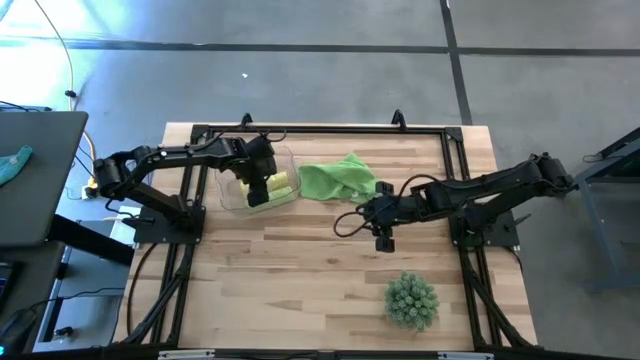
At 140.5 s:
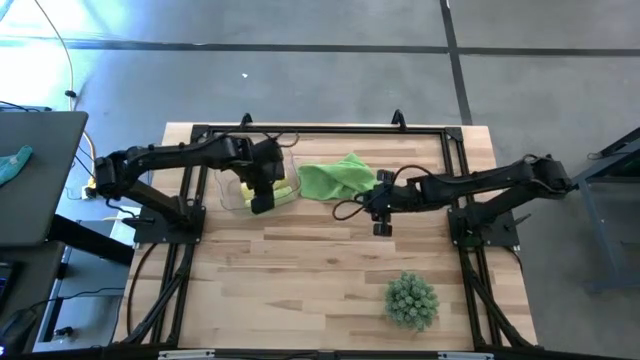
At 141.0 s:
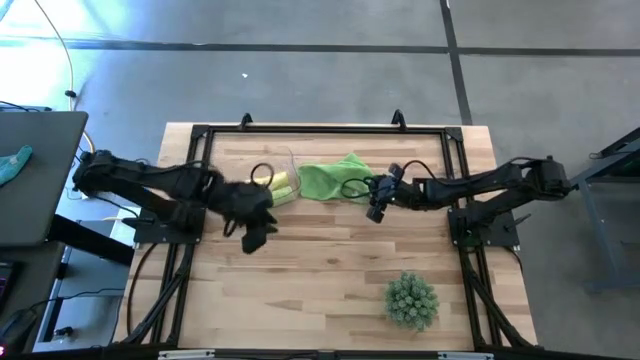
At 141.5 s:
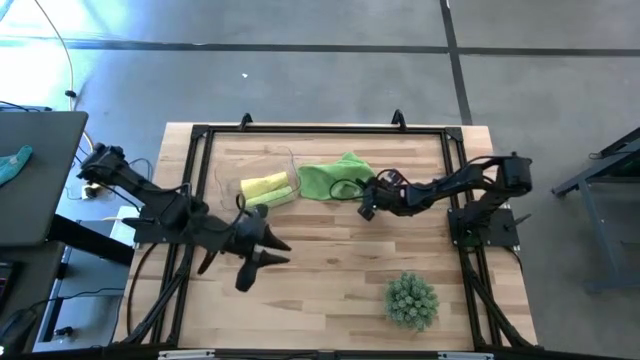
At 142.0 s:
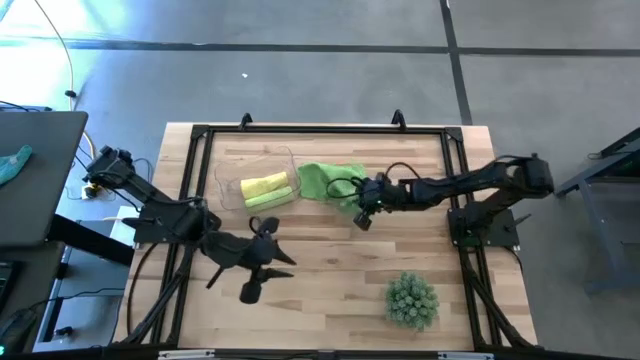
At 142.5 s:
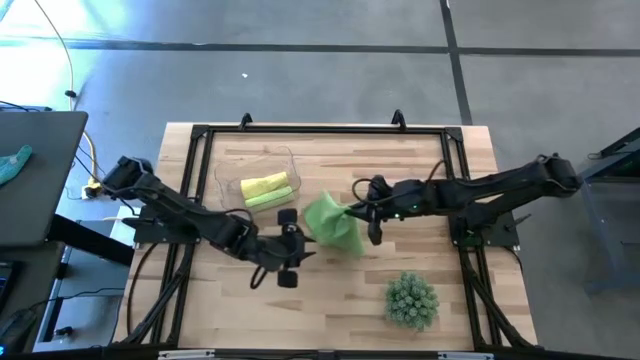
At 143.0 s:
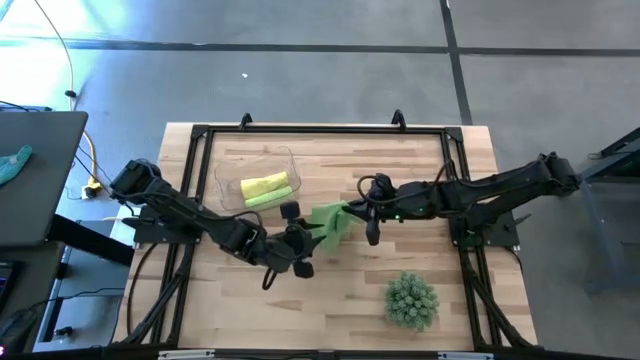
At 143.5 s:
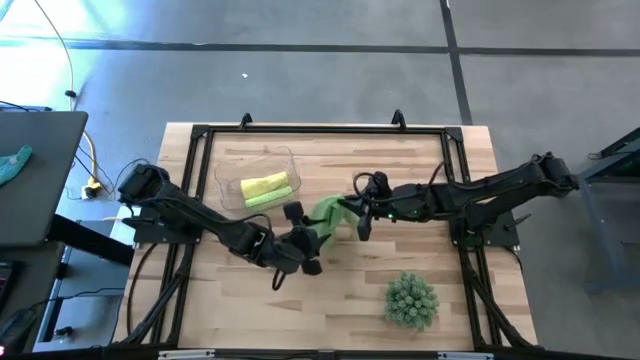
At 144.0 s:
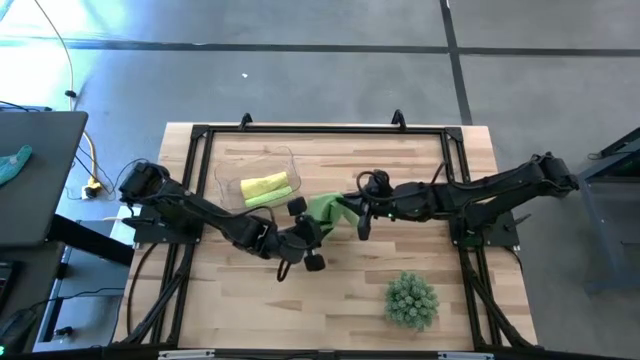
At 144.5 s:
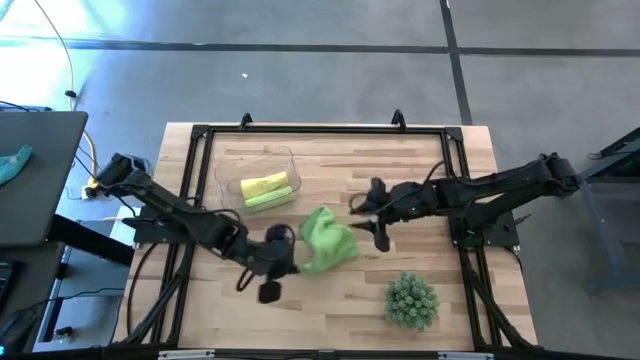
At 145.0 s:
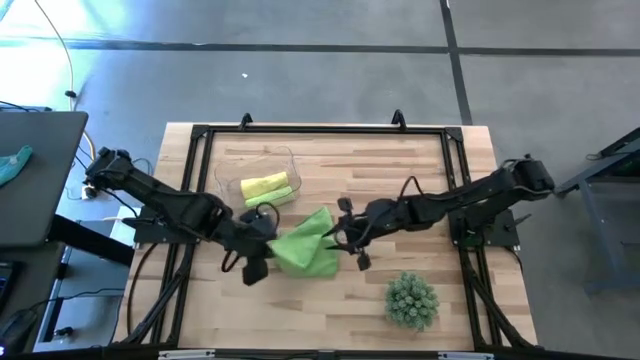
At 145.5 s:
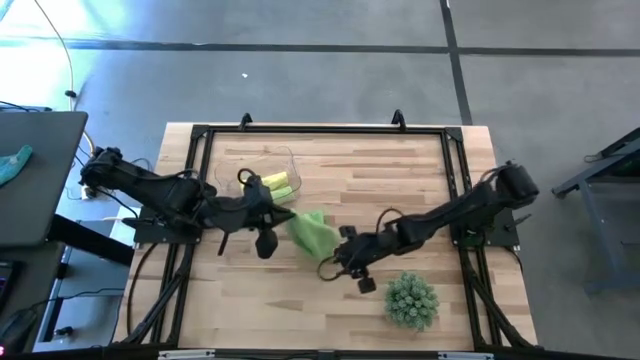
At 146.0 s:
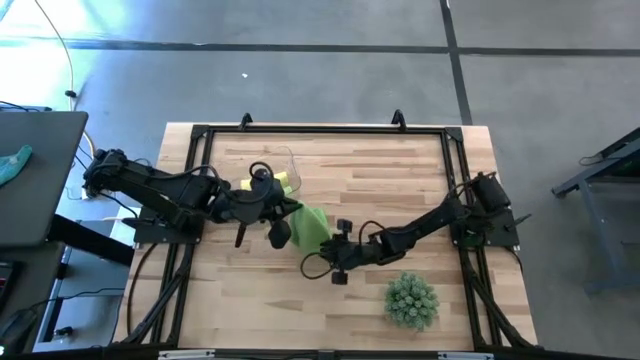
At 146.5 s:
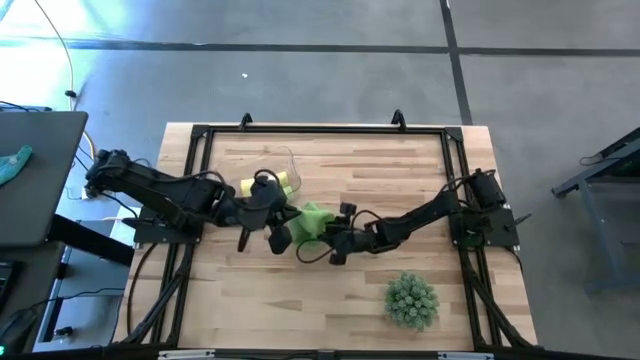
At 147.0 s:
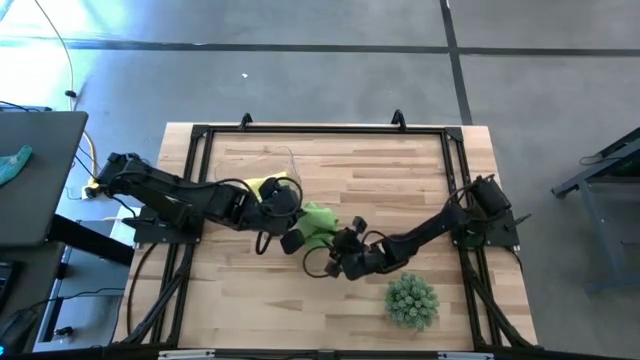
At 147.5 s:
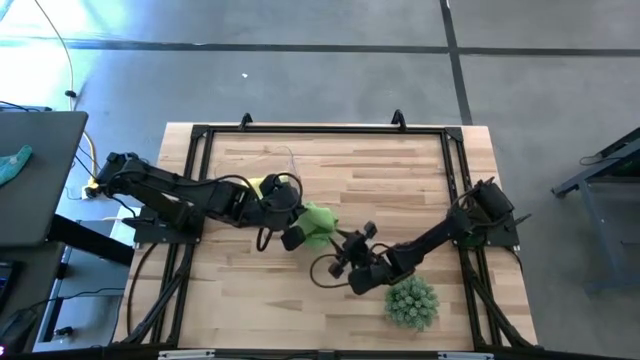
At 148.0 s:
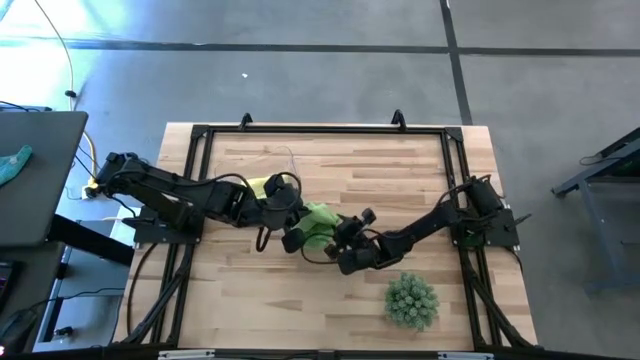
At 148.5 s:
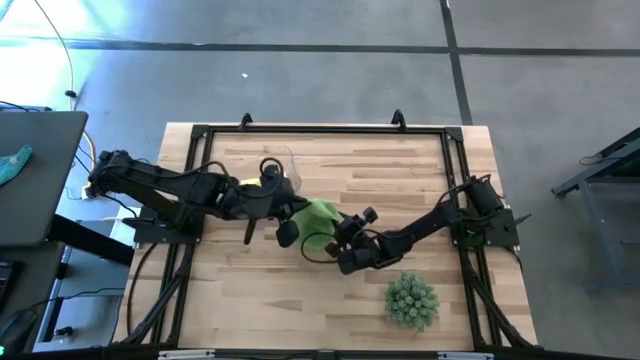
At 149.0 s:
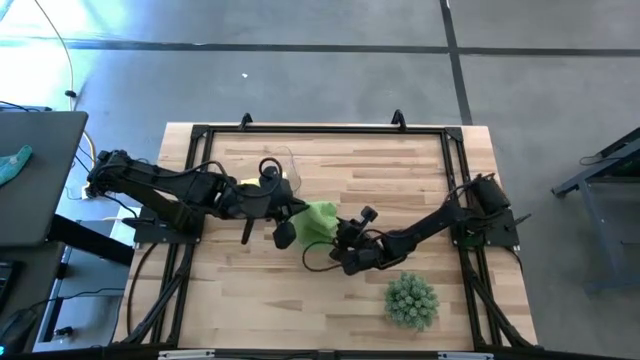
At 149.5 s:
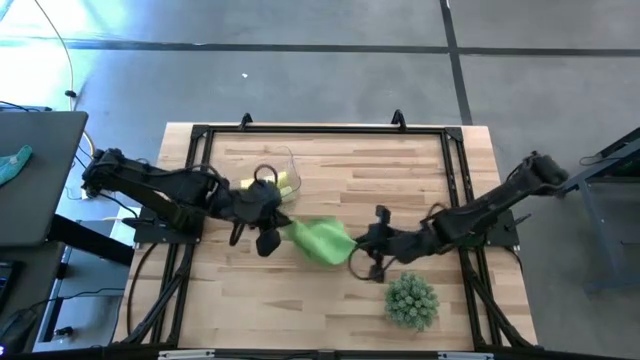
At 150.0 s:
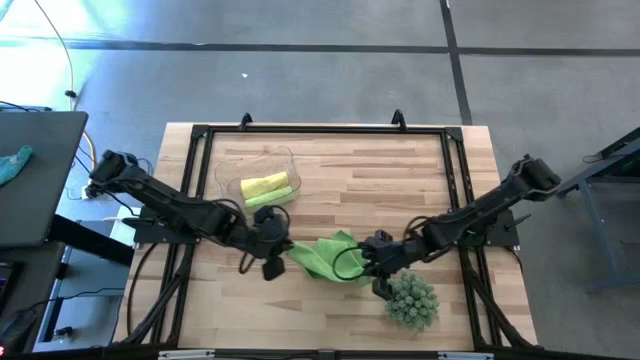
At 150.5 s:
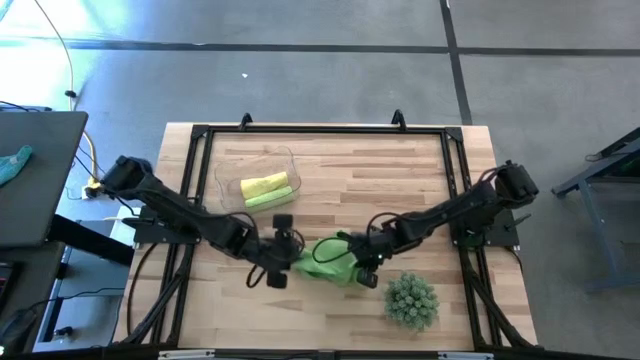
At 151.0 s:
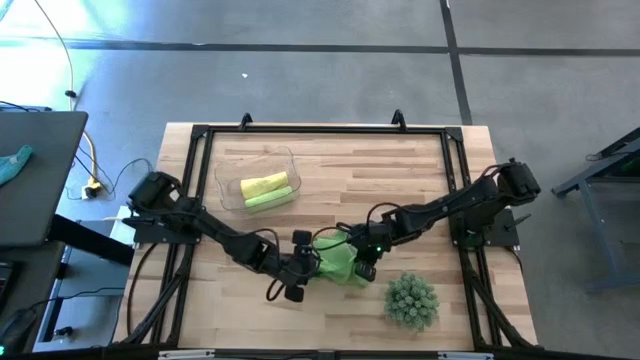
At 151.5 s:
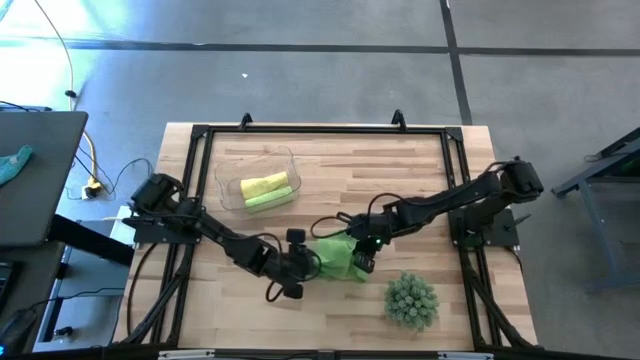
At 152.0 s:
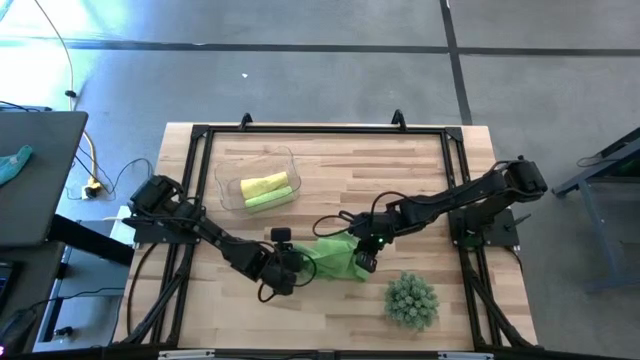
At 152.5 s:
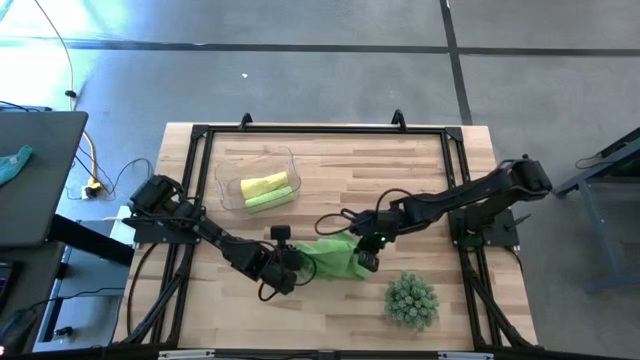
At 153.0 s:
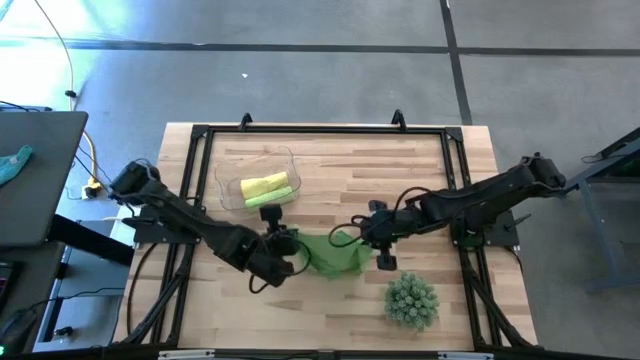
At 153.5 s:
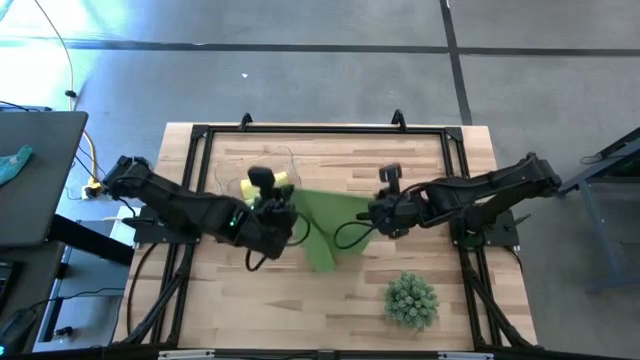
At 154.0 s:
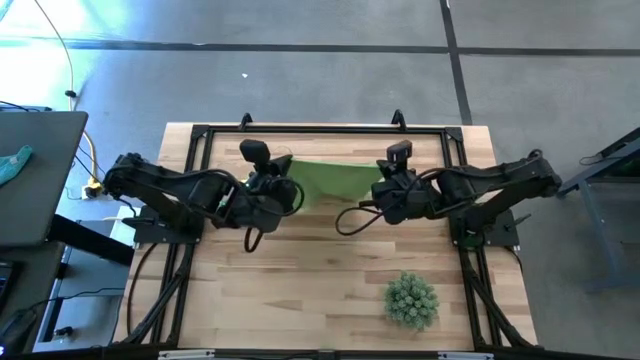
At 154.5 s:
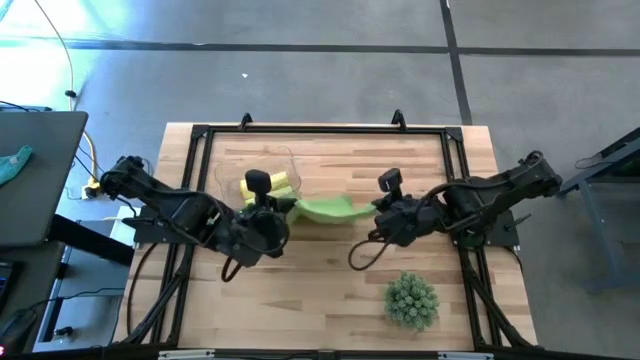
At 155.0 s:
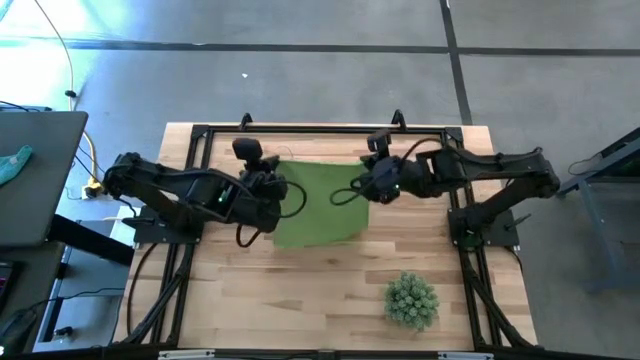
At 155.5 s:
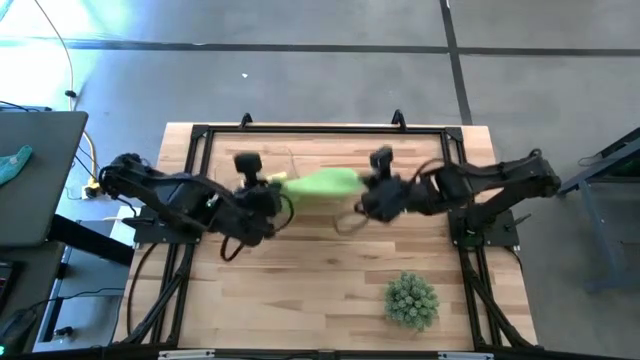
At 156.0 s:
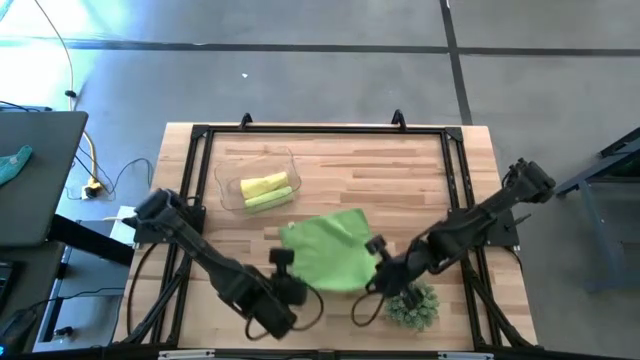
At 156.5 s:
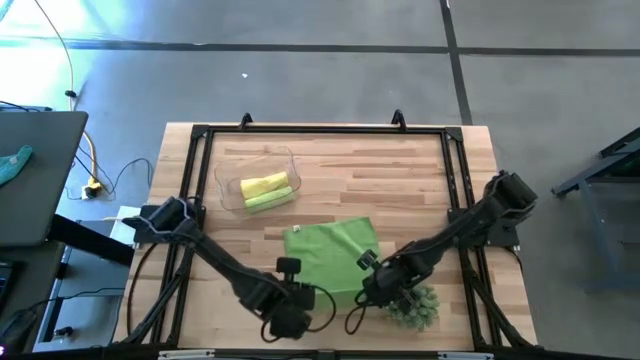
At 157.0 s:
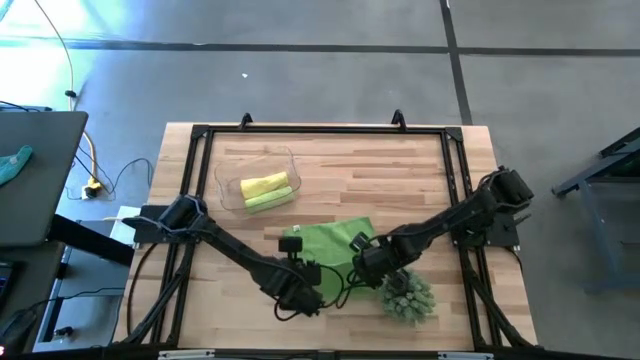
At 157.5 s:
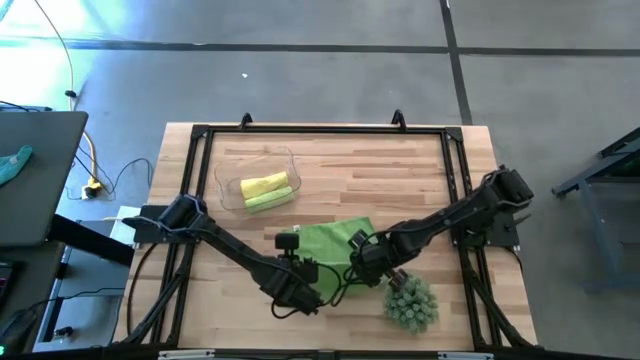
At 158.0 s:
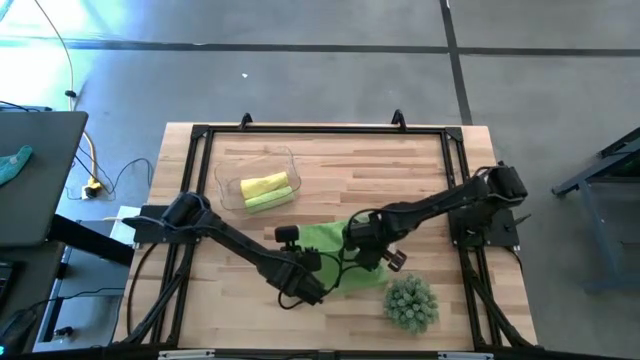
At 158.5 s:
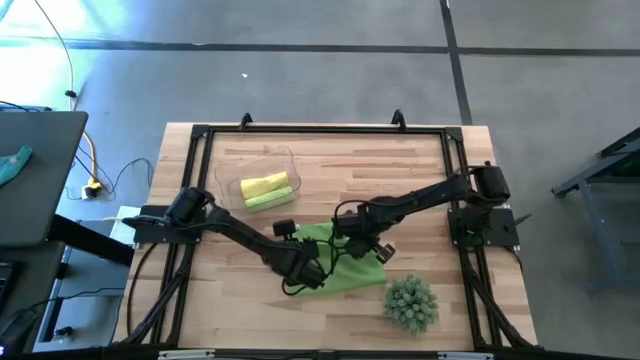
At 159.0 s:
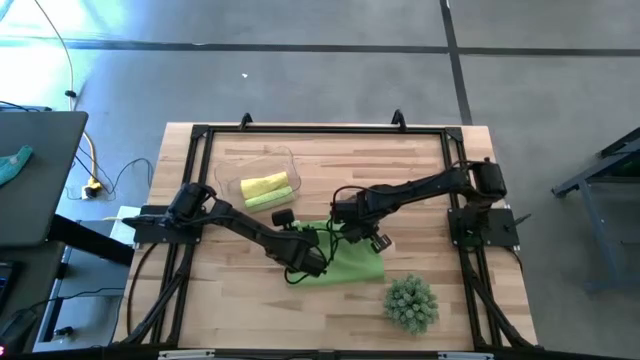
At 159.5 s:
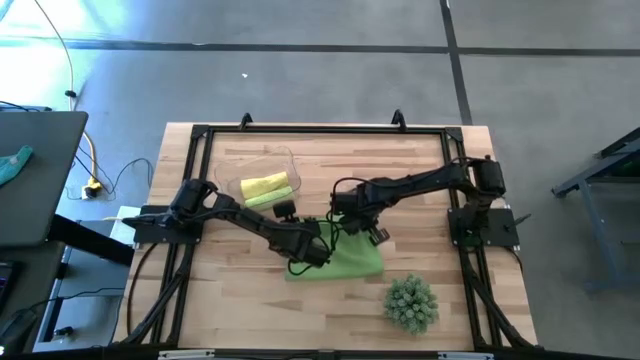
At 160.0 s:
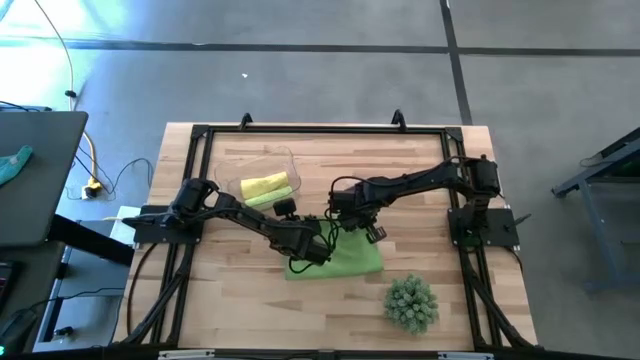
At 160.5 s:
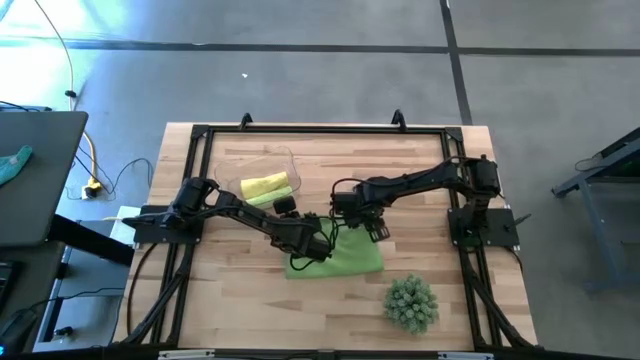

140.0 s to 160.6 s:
Task: Roll microfiber towels into tight, uniform cylinder then place into a basket
Fold the green towel
